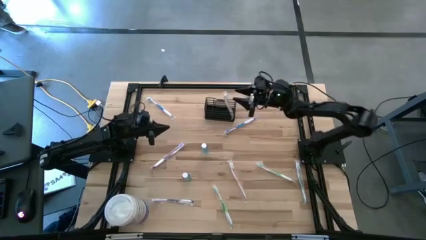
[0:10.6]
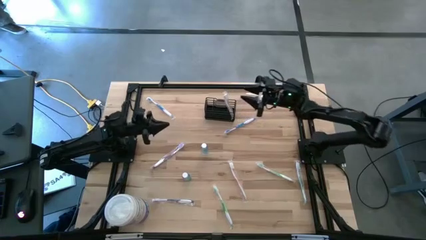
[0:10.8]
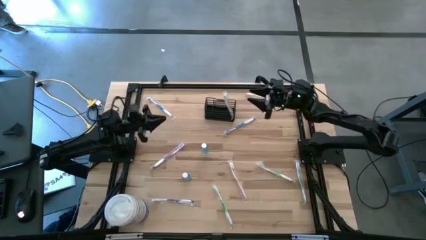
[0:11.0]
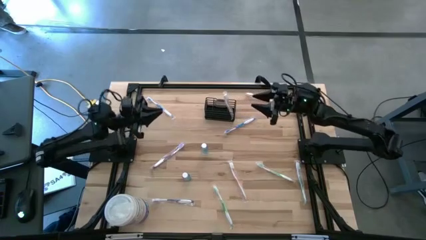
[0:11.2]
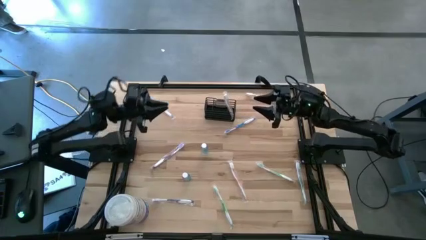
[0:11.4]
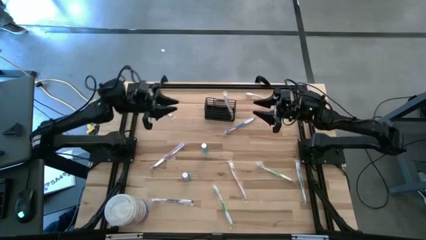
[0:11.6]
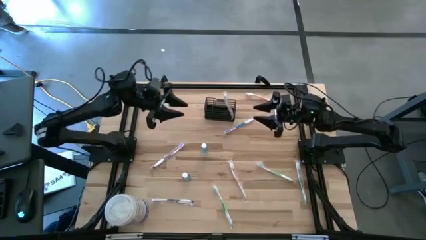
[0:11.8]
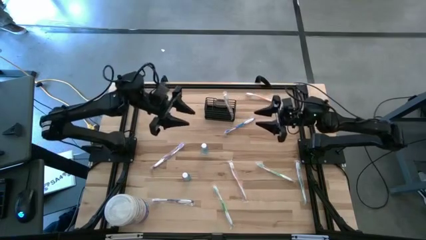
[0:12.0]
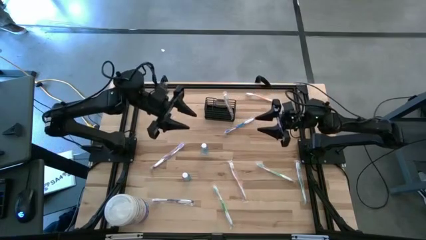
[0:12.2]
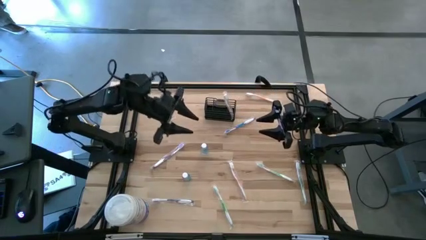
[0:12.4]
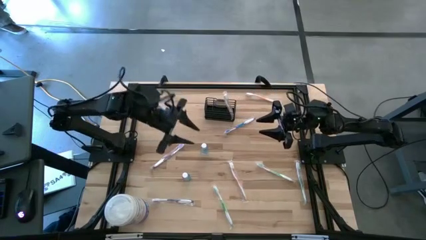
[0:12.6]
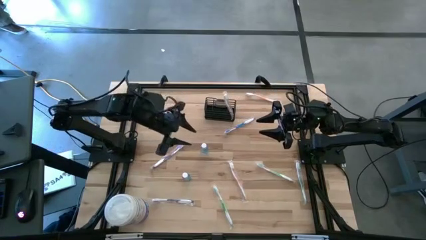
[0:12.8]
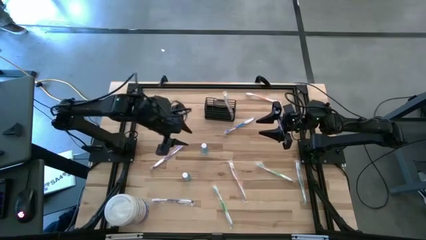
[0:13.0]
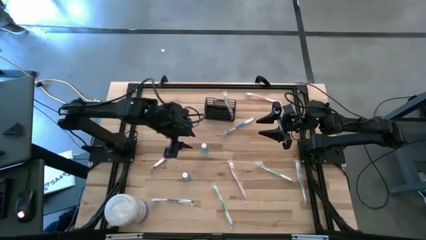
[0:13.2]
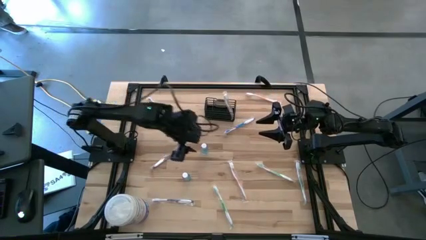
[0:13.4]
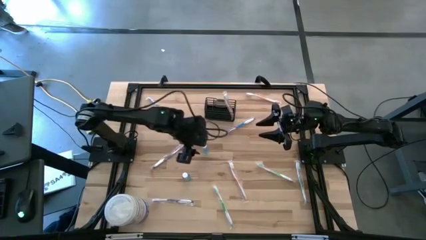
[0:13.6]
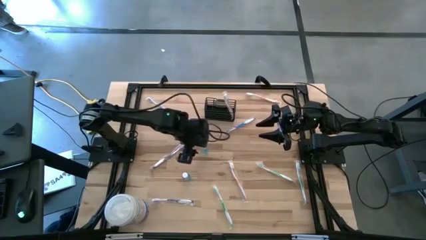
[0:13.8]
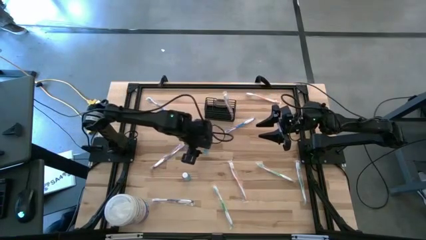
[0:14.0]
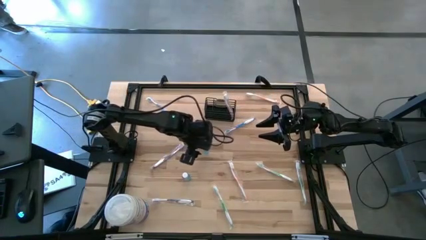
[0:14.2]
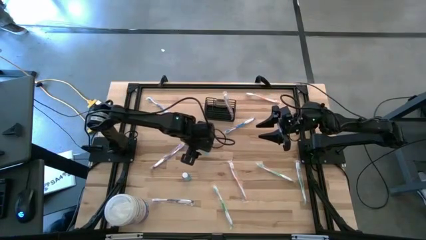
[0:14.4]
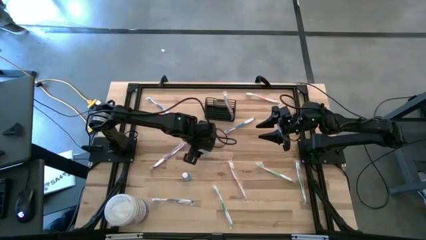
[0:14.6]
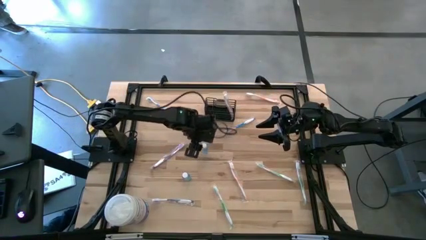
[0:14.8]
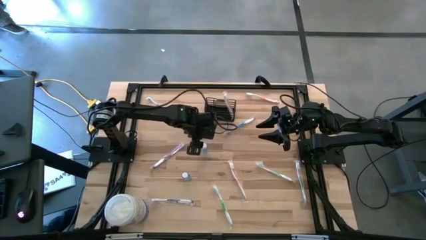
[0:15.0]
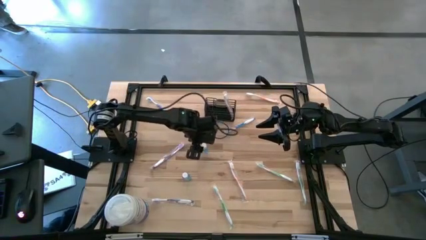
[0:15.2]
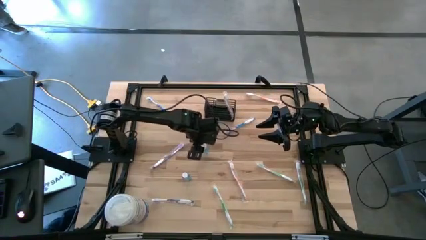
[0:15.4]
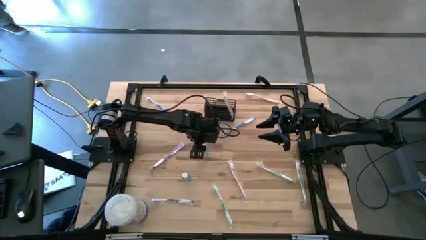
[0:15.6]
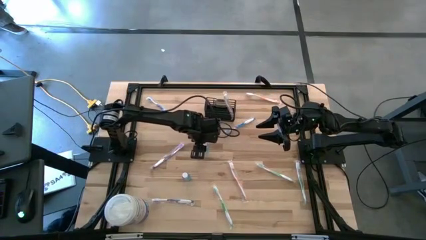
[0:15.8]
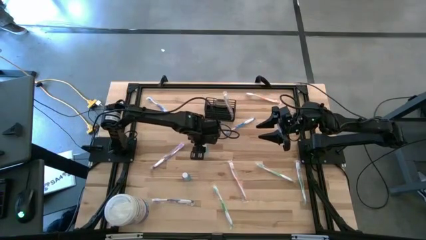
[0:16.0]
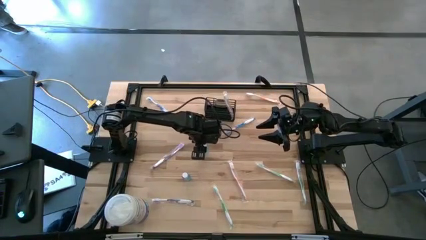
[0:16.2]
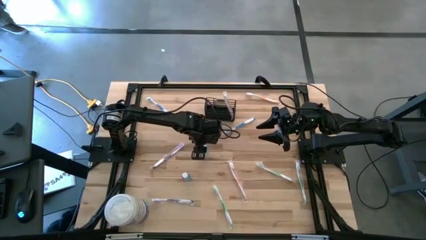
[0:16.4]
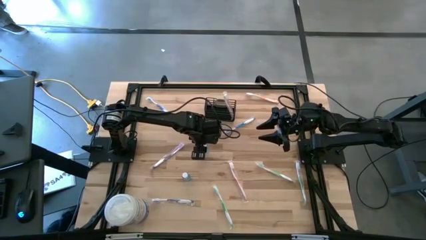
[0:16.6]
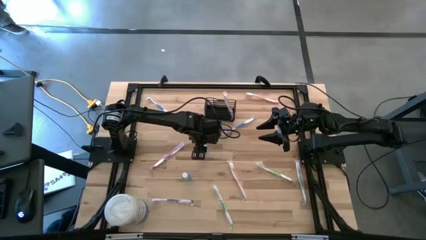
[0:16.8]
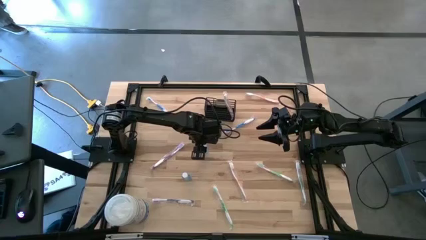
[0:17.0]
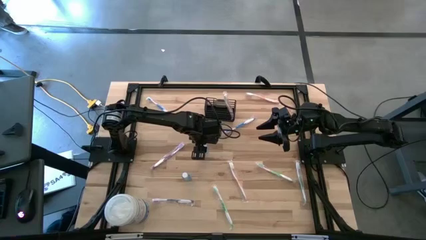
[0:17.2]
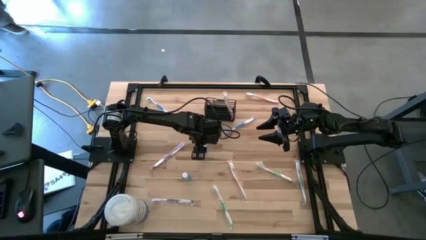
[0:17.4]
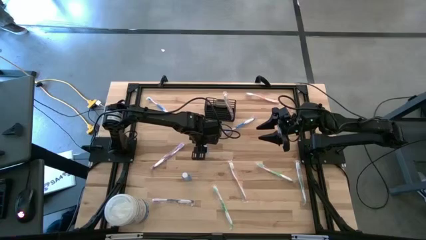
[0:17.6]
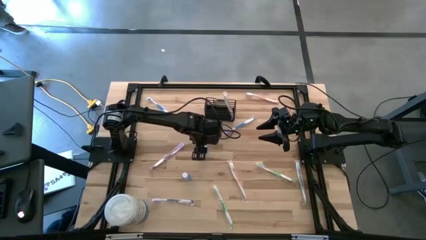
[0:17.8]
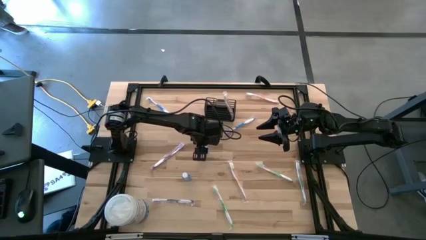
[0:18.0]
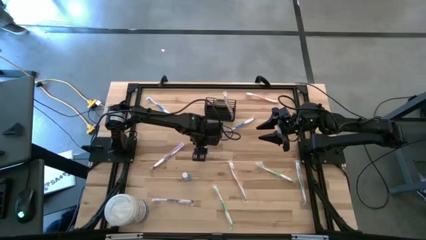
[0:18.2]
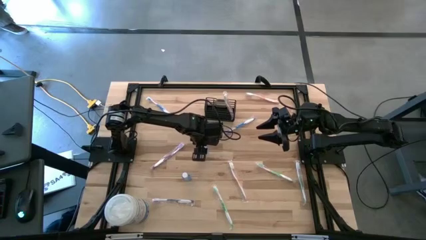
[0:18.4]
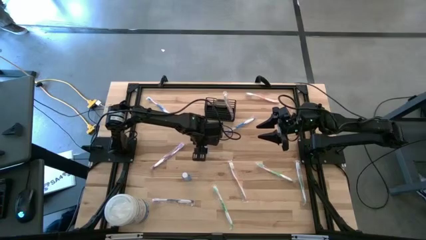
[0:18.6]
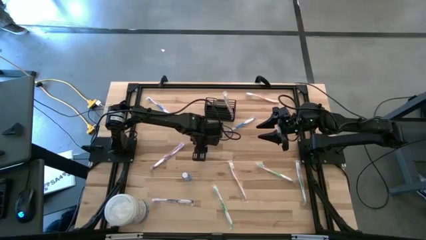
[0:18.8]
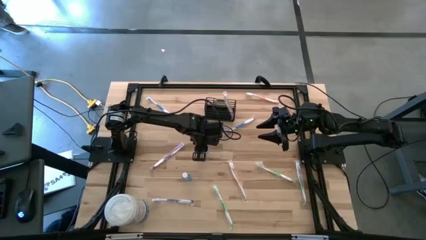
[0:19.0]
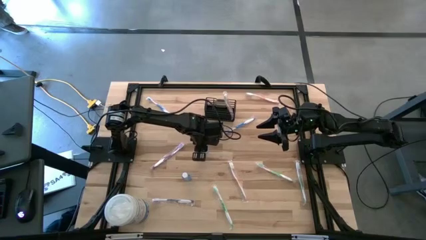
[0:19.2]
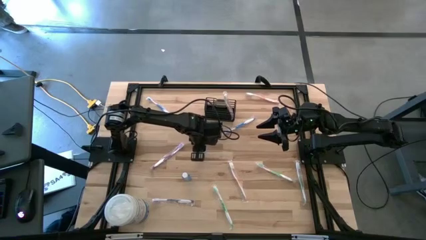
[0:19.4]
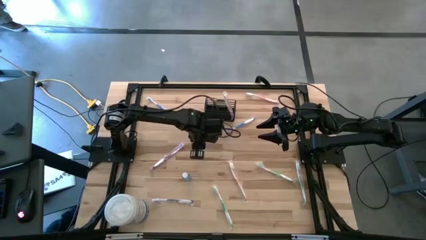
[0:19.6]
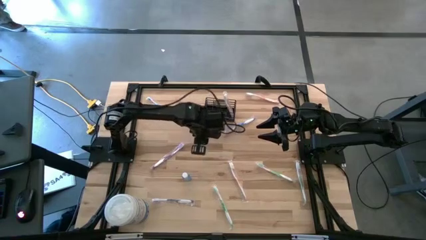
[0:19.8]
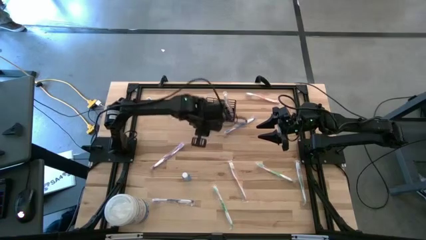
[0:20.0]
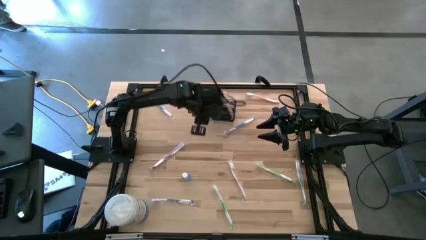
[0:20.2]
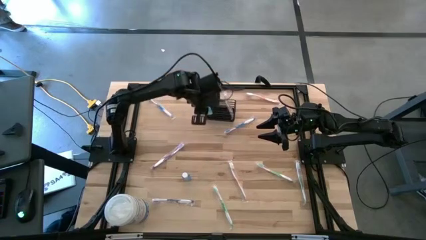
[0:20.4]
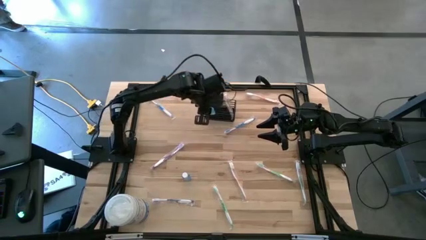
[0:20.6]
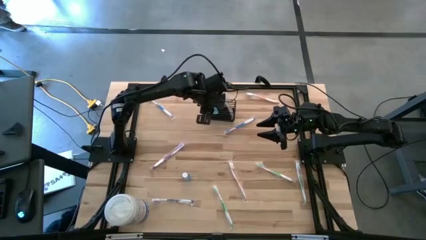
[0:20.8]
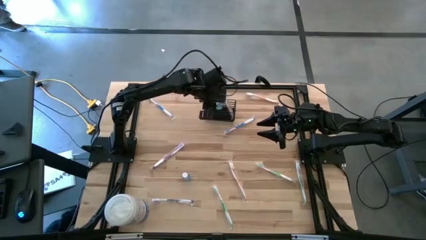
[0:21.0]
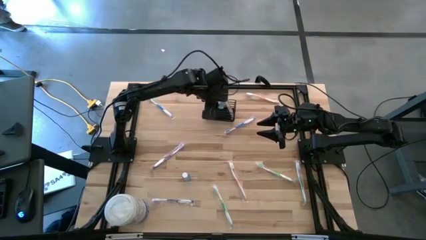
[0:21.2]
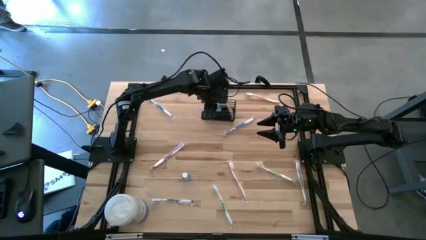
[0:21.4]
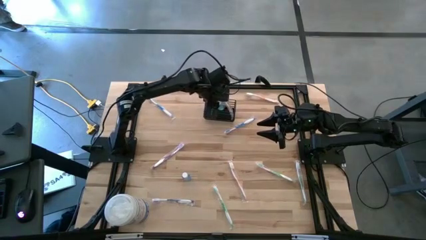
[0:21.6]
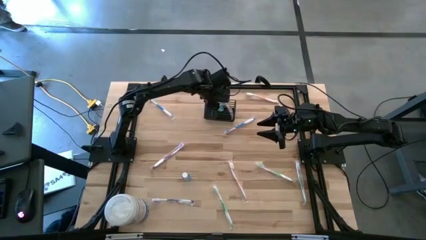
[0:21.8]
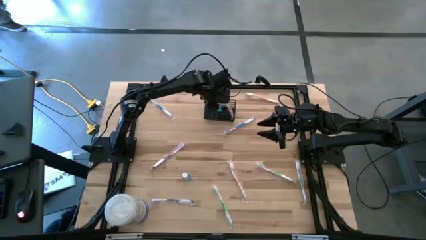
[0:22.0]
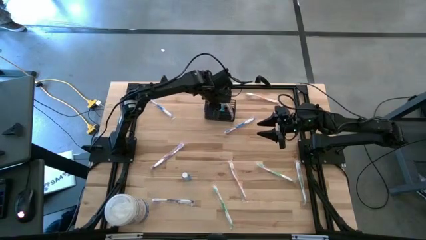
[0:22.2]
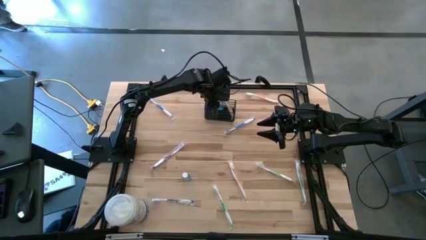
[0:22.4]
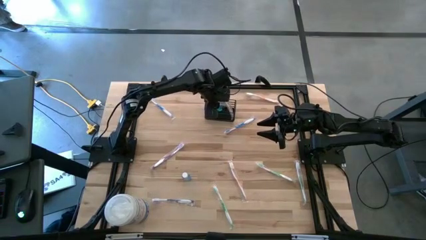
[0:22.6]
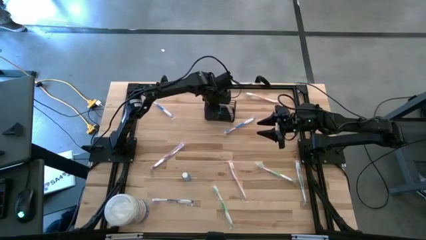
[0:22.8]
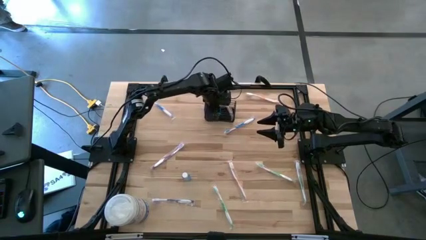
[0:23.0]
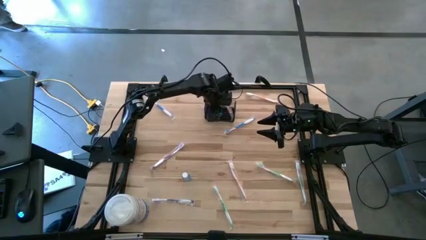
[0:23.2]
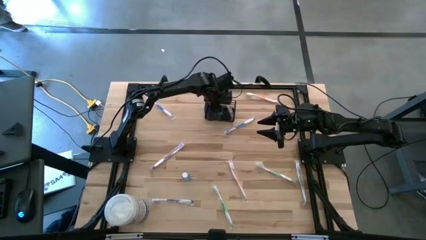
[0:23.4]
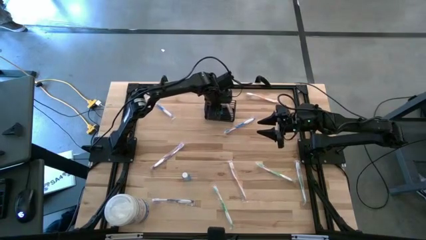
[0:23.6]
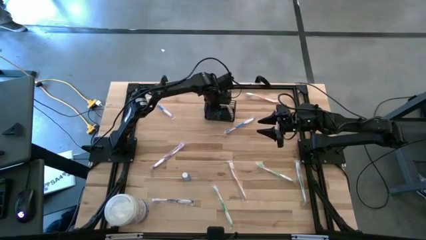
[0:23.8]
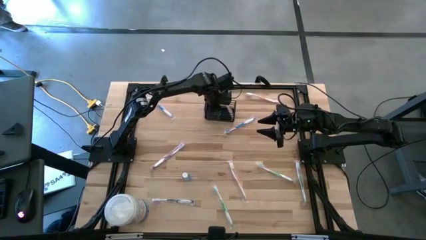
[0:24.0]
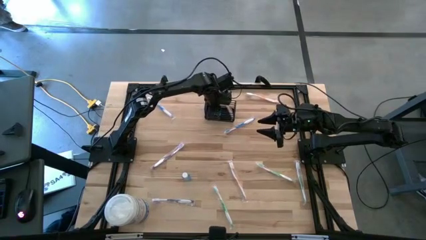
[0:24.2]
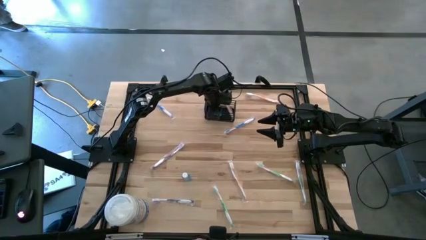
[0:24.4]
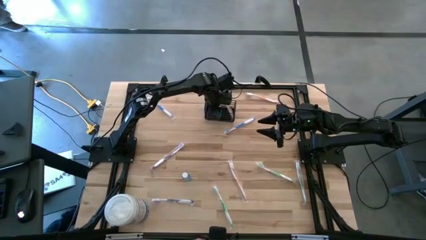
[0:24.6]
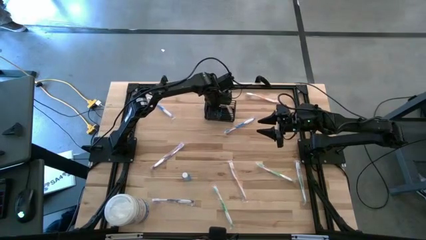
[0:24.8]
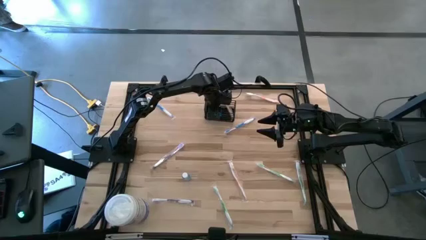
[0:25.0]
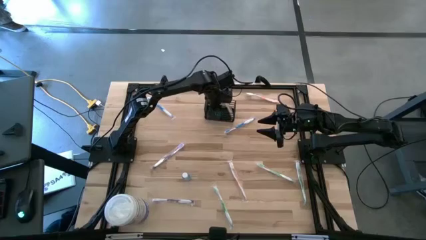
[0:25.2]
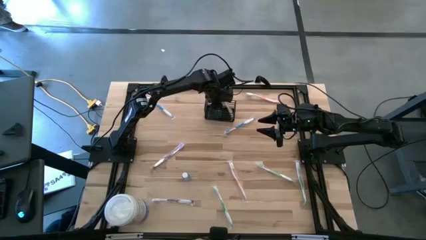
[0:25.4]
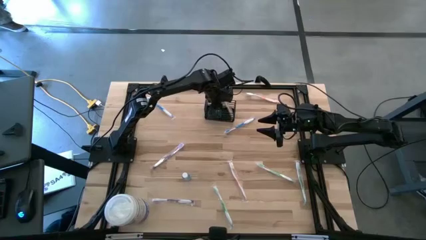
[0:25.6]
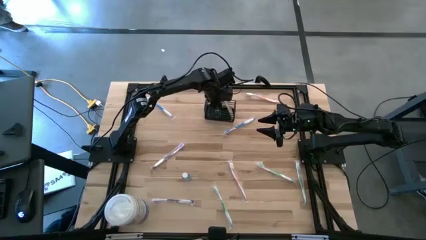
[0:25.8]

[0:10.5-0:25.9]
Task: Pick & Place toothbrushing station
Put the top blue mouthwash into the mesh organizer
